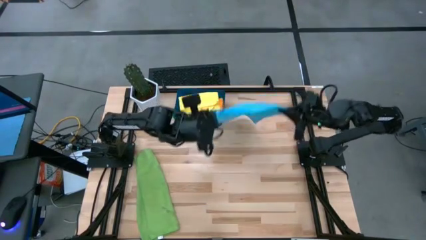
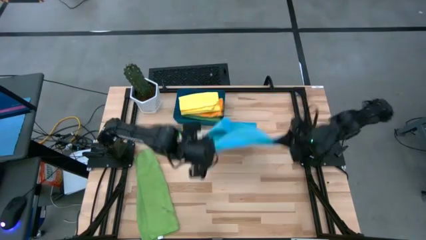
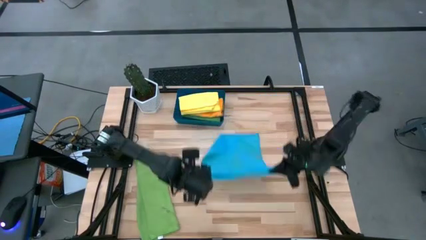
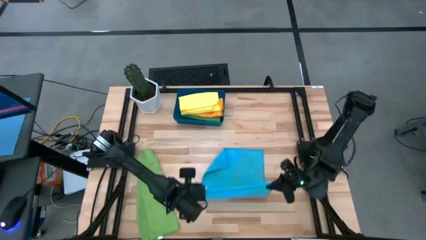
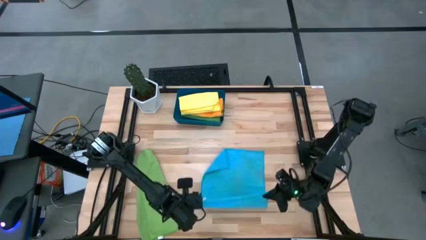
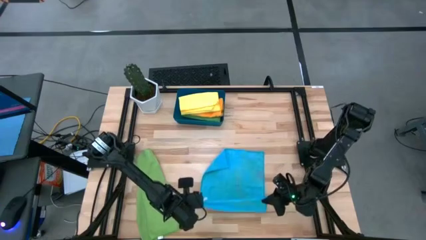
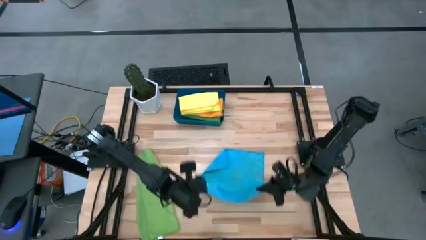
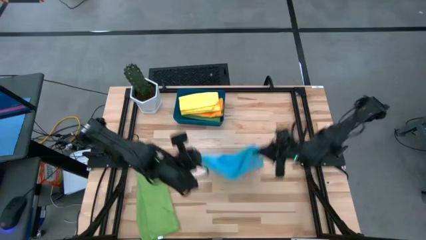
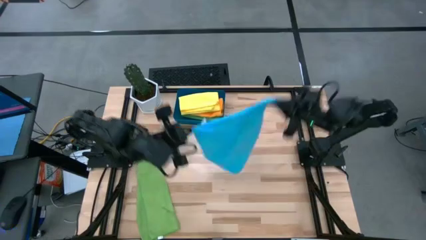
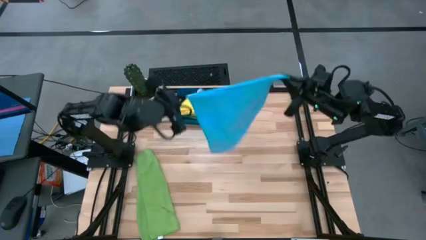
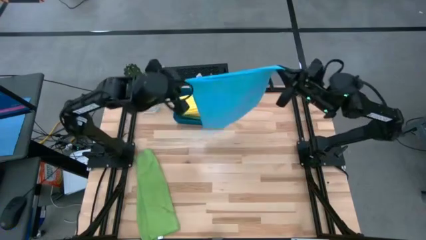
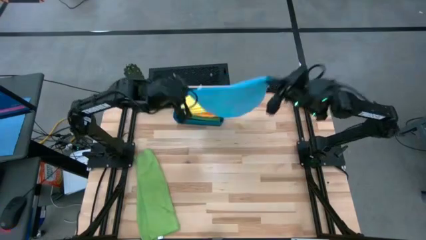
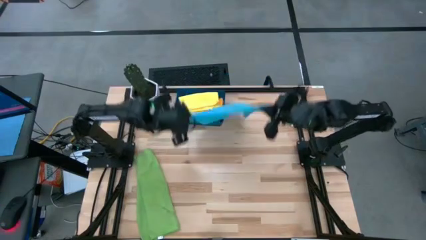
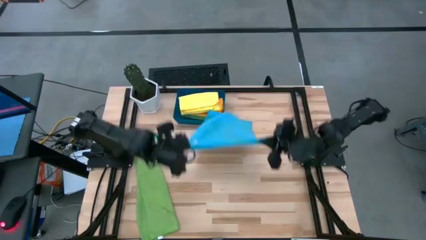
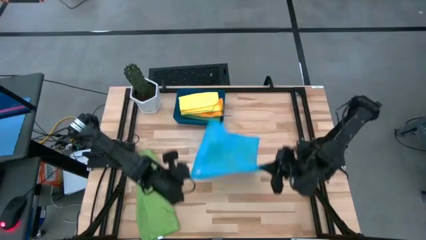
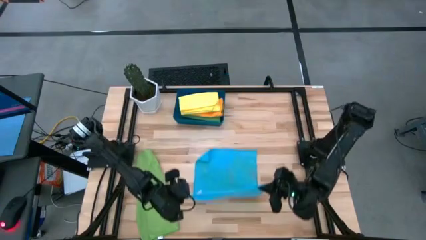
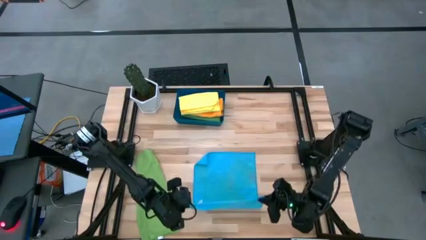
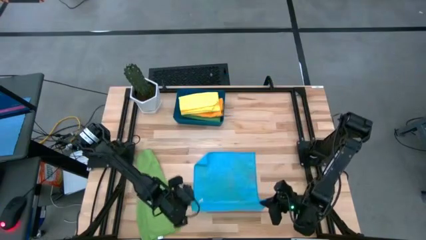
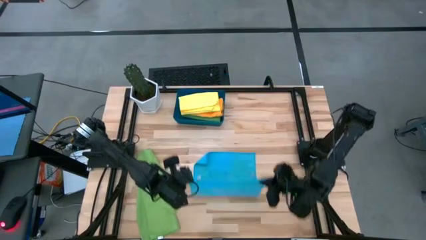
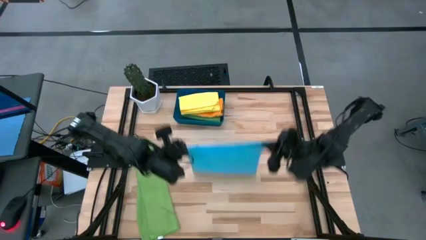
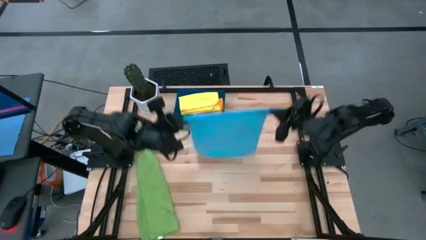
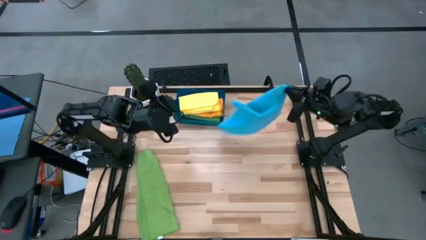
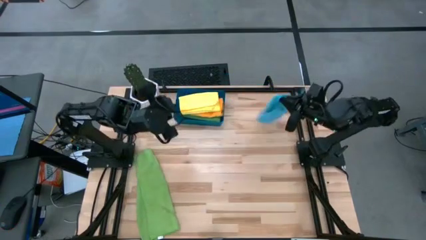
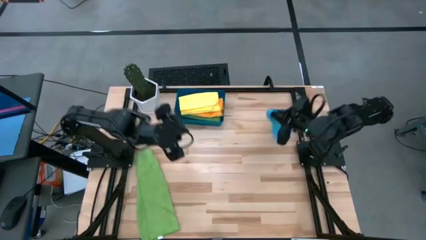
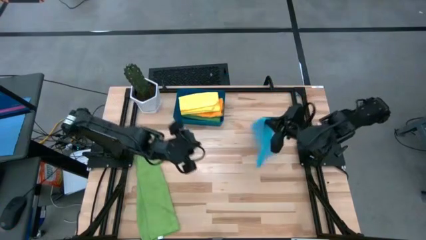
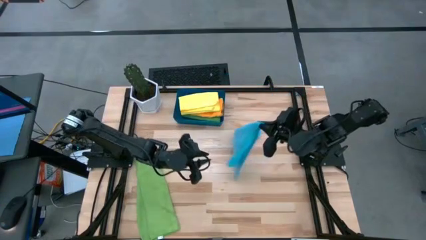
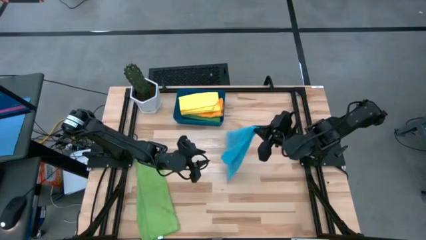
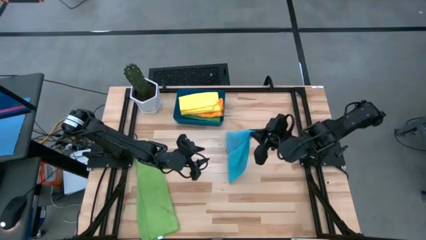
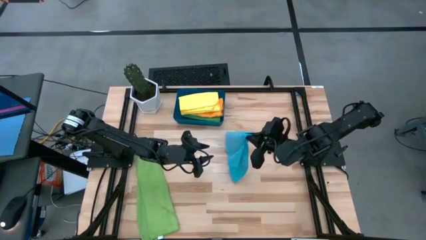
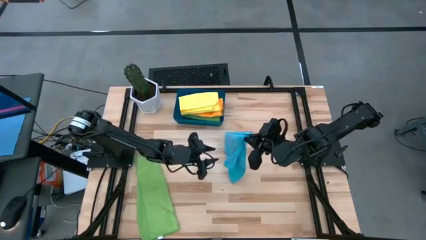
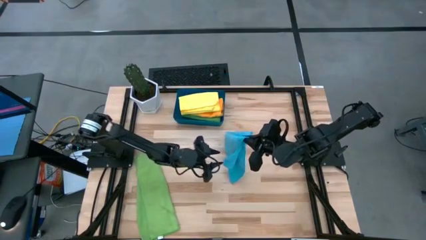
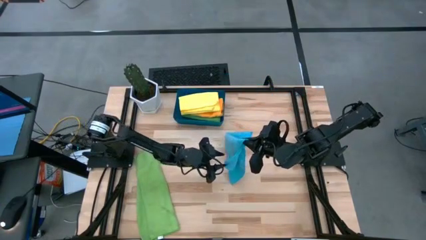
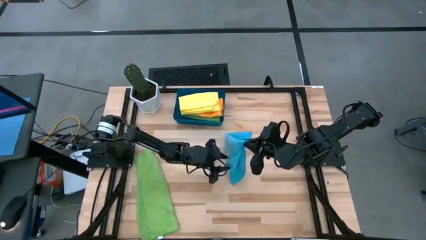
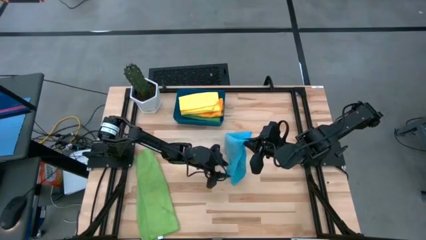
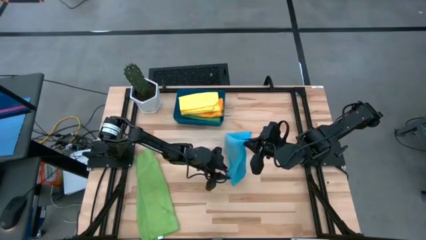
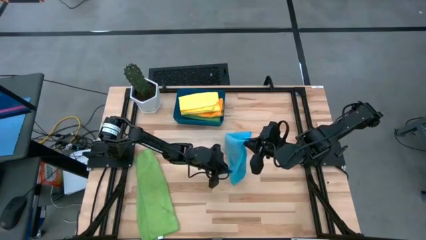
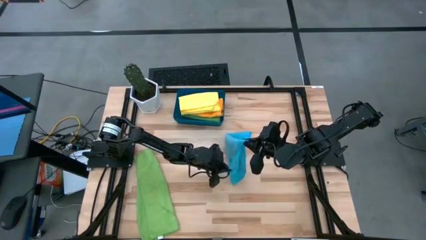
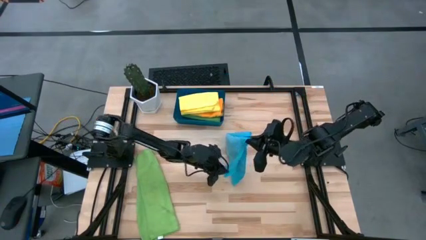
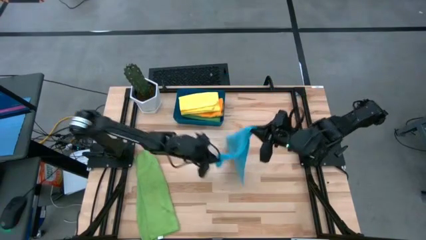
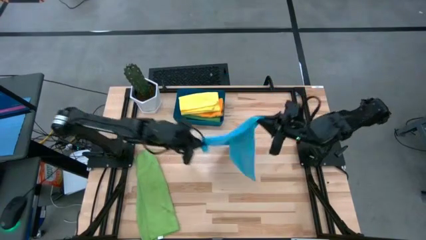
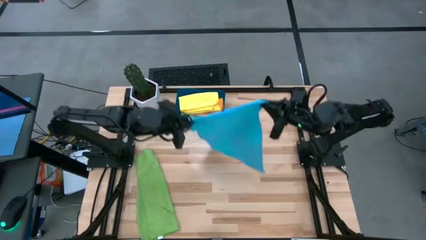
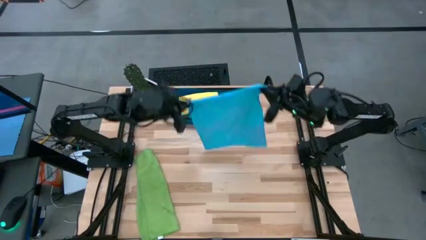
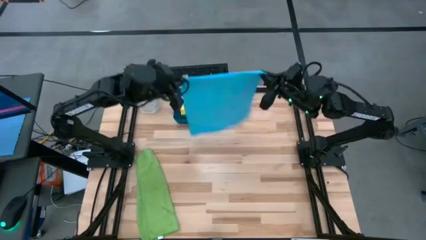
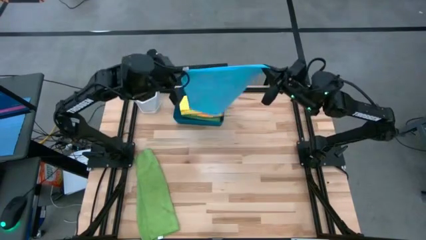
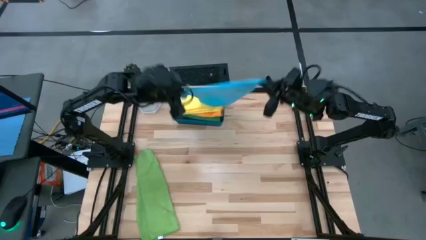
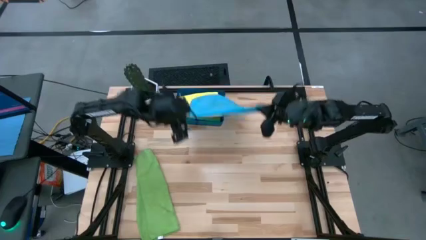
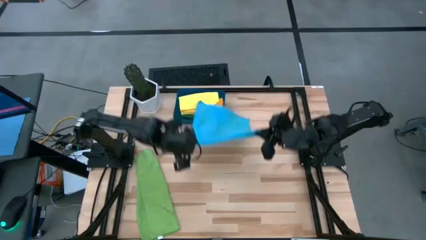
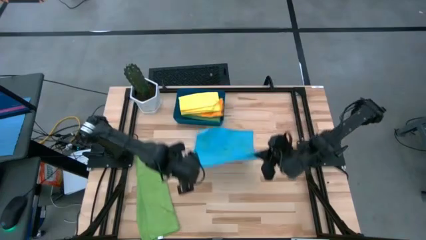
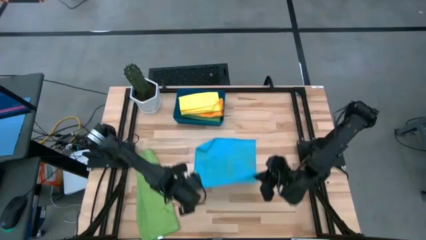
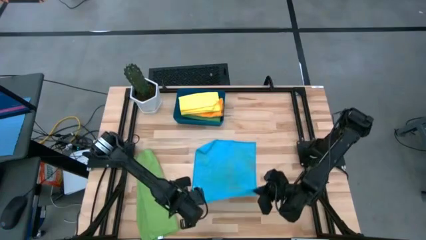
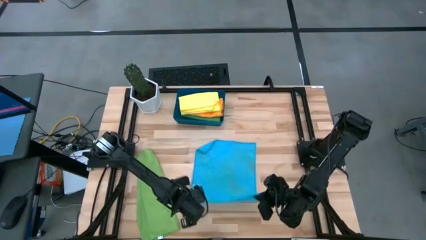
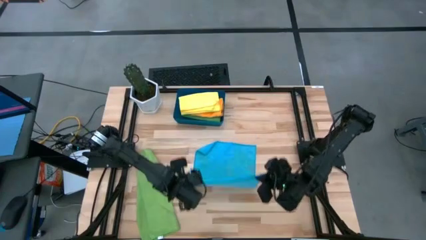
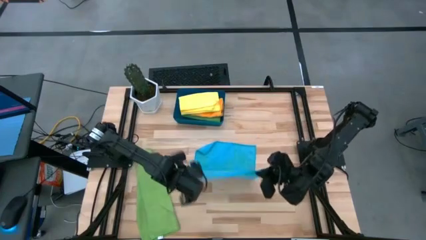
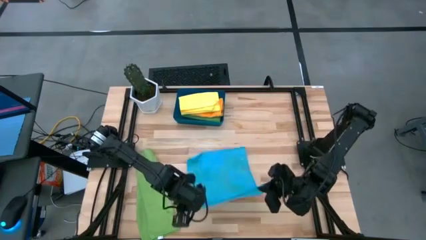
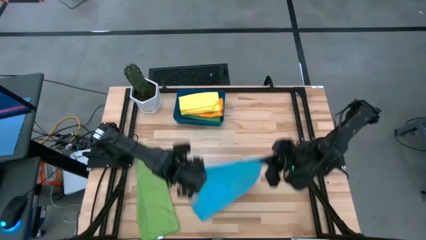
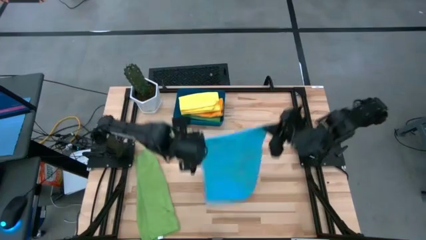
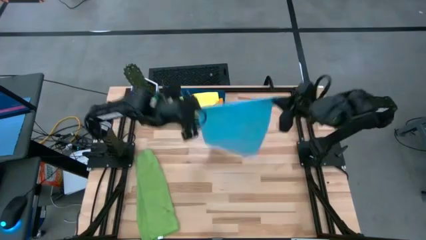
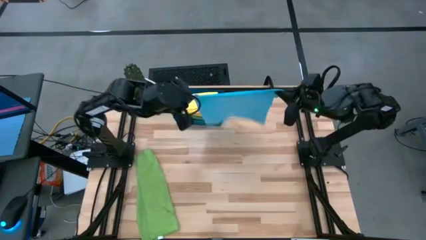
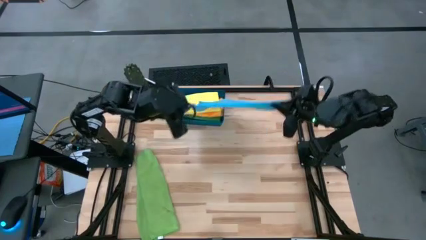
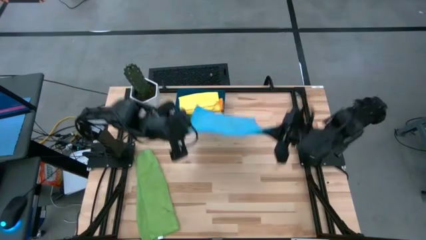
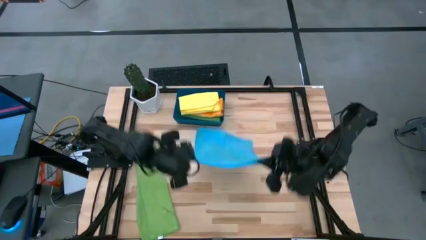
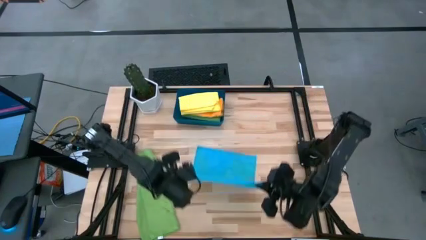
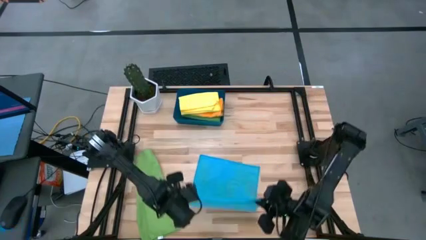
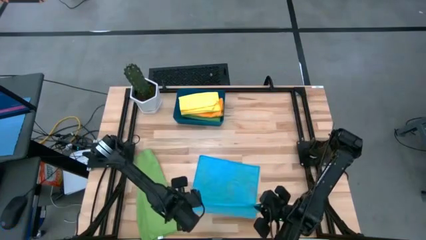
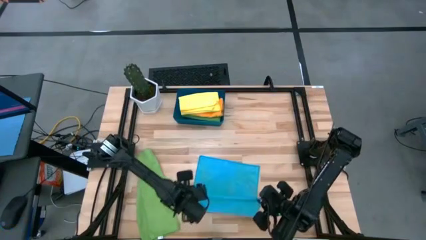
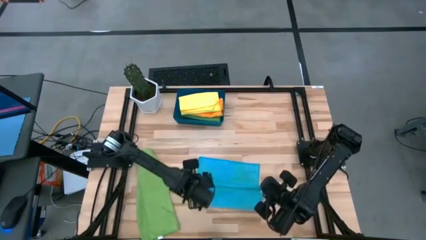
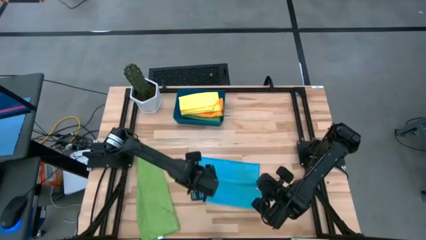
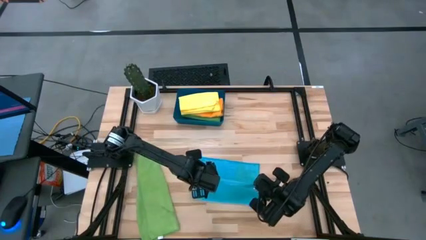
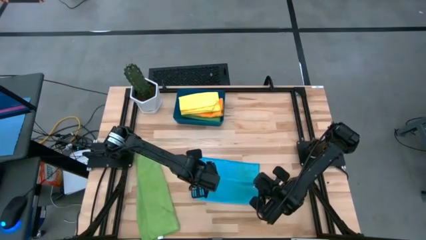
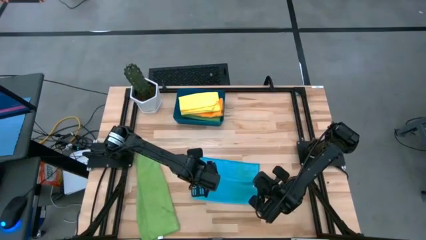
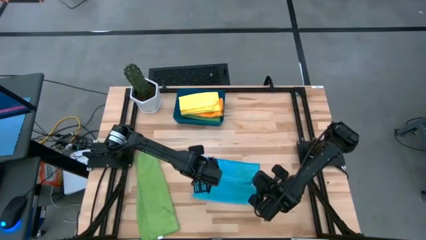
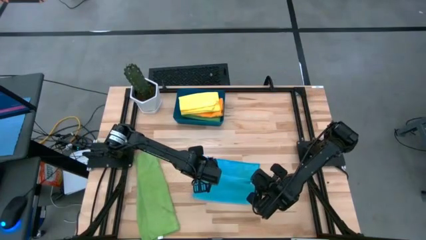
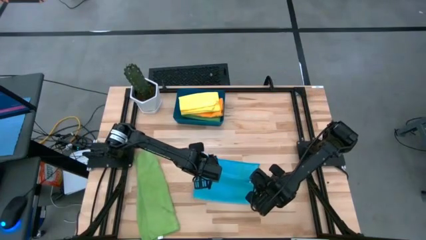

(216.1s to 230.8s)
Task: Fold microfiber towels
Fold the blue towel
